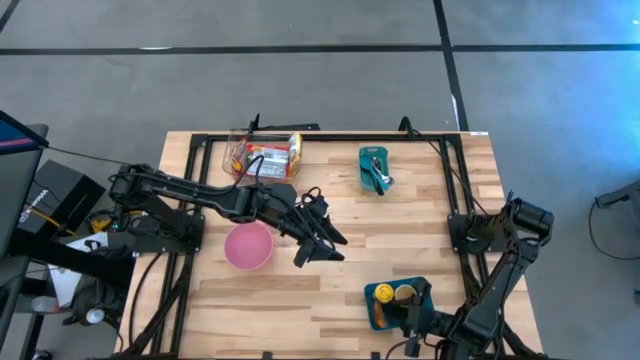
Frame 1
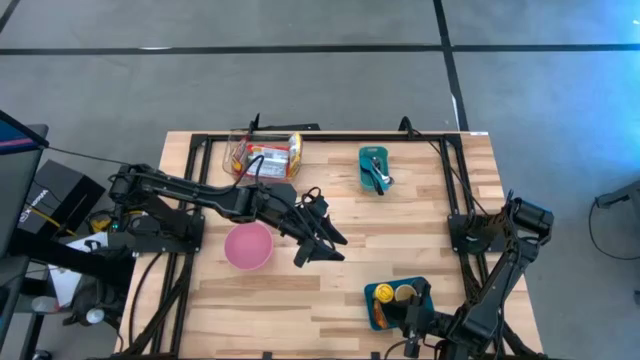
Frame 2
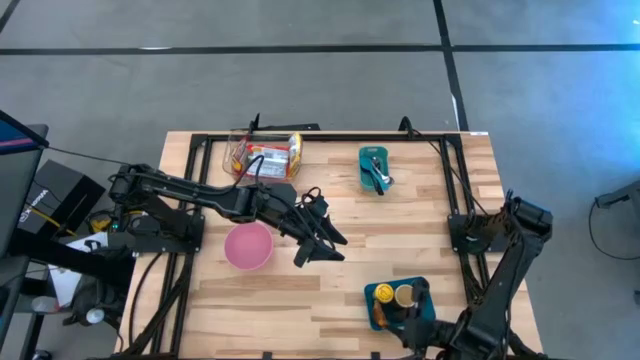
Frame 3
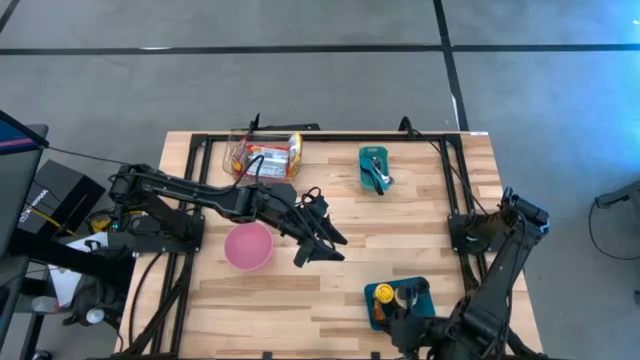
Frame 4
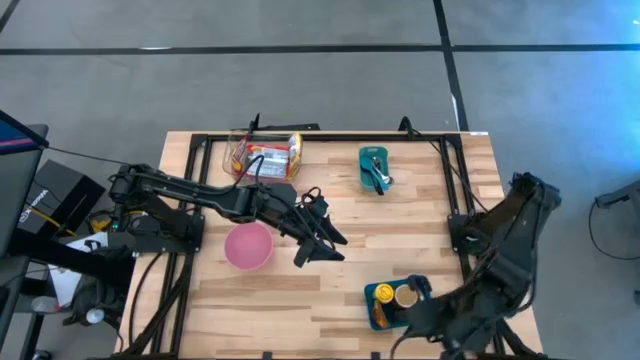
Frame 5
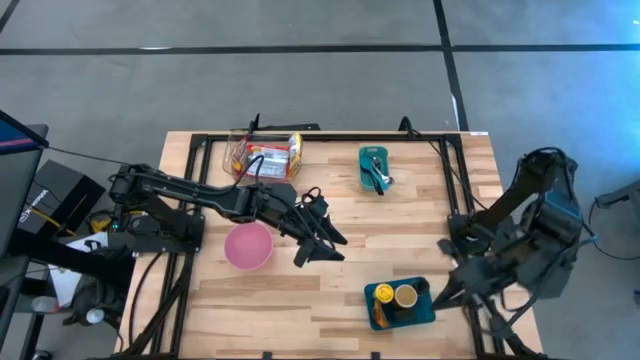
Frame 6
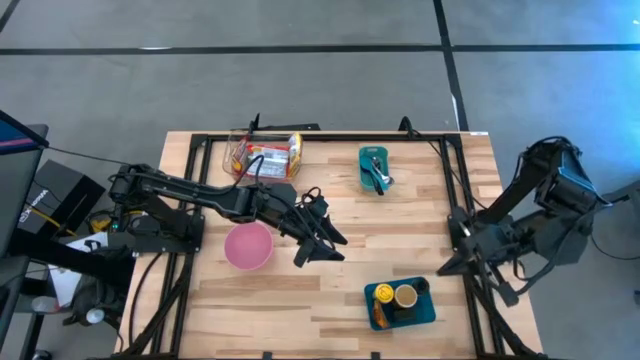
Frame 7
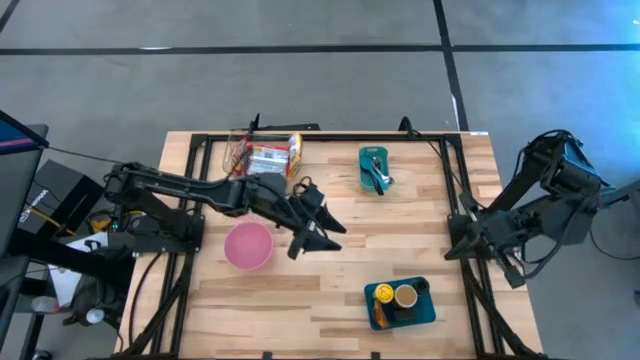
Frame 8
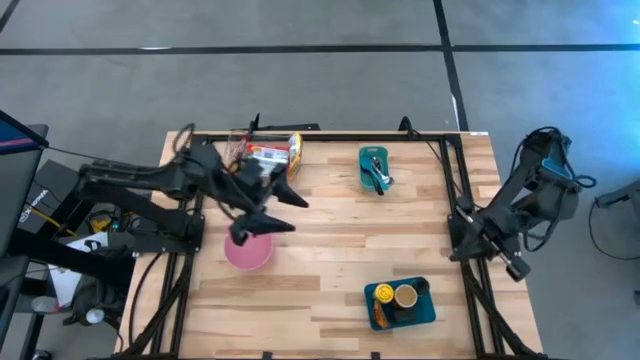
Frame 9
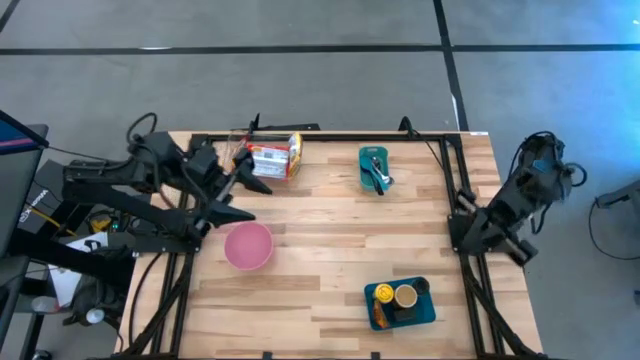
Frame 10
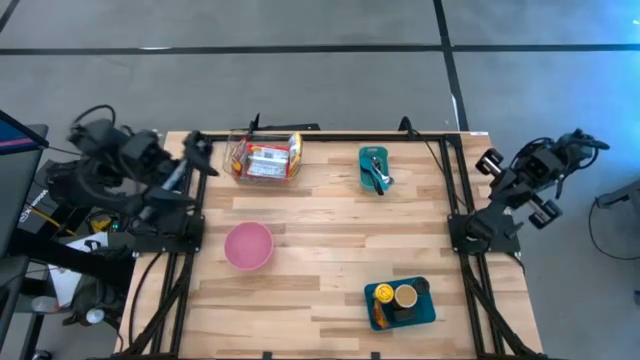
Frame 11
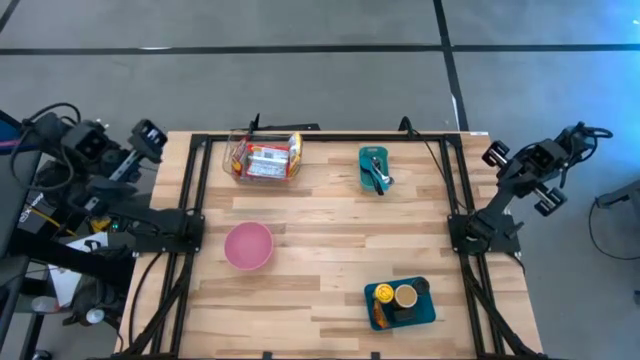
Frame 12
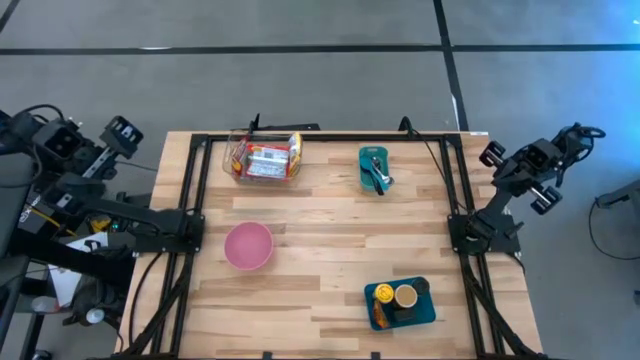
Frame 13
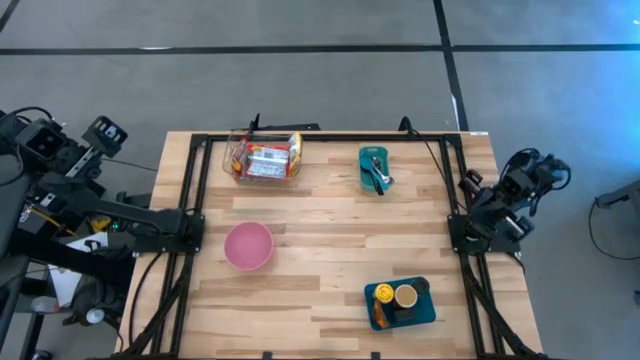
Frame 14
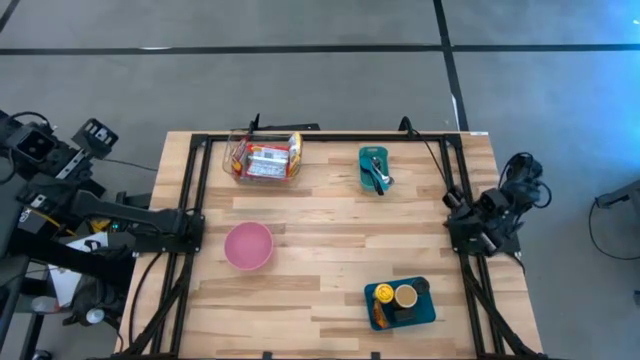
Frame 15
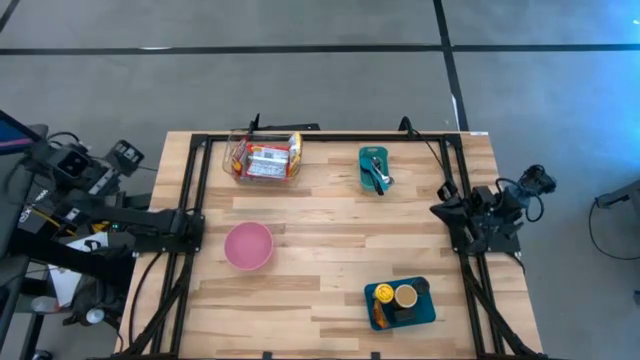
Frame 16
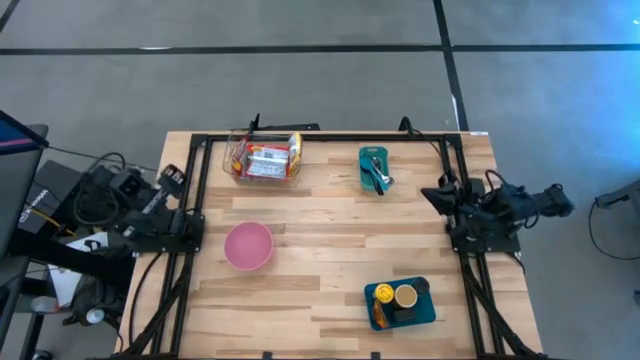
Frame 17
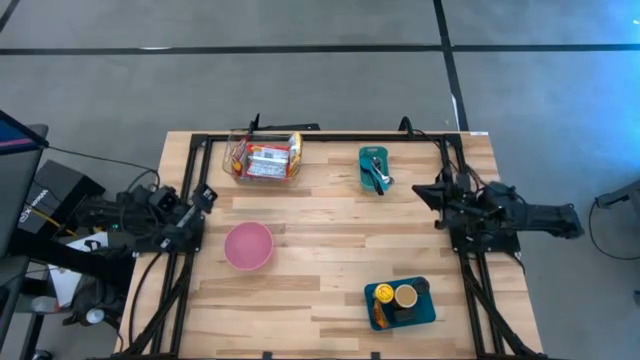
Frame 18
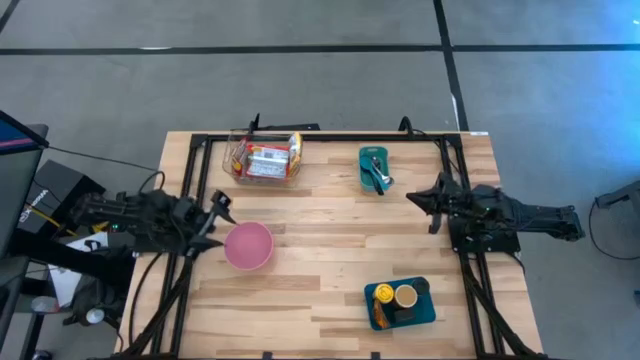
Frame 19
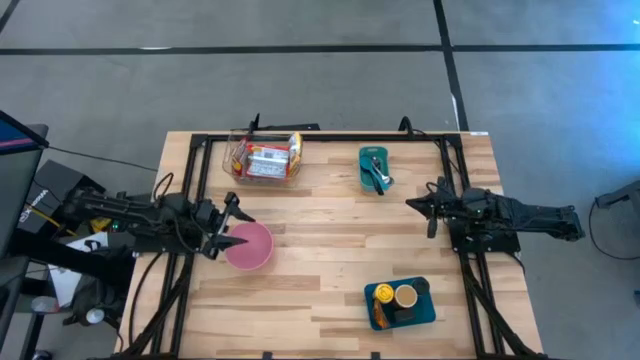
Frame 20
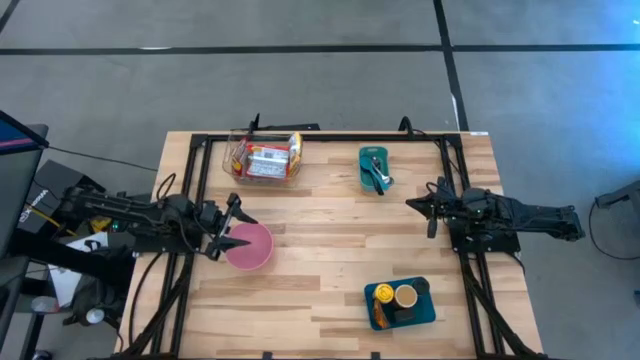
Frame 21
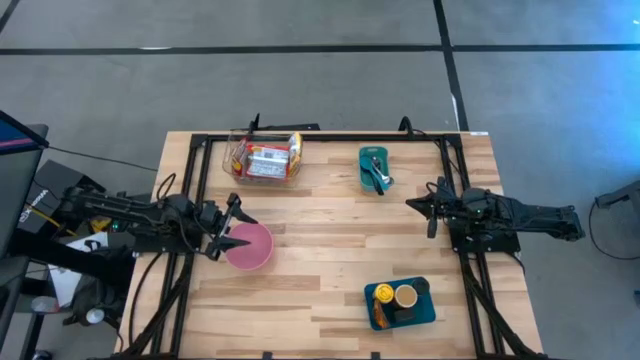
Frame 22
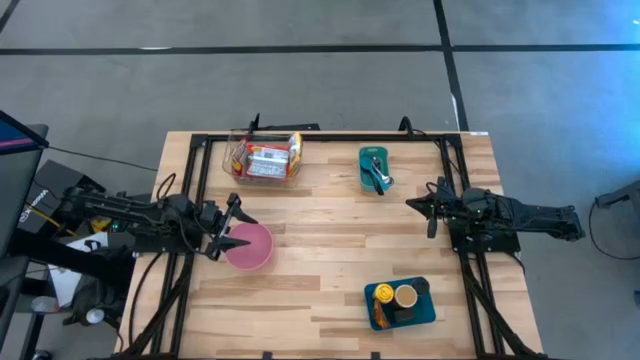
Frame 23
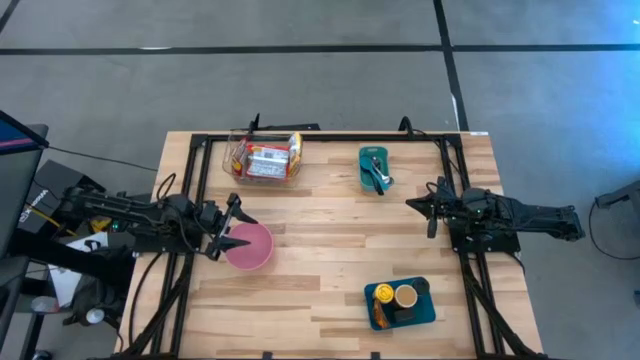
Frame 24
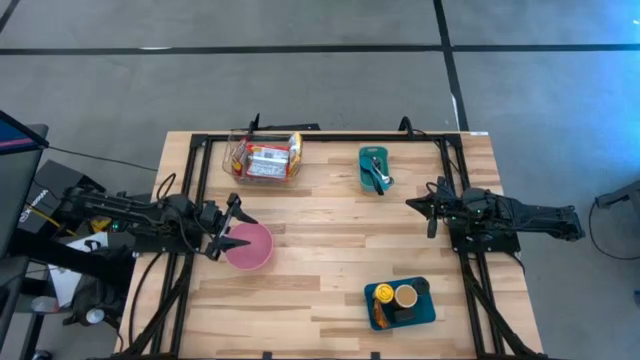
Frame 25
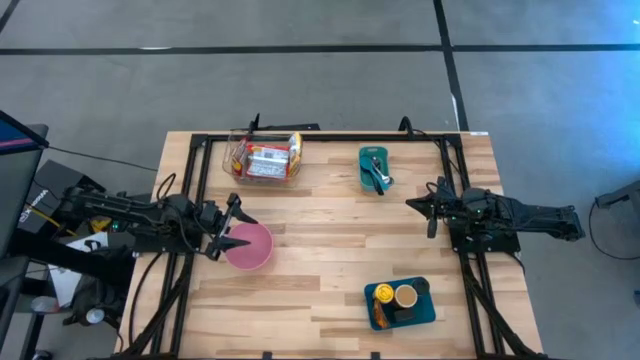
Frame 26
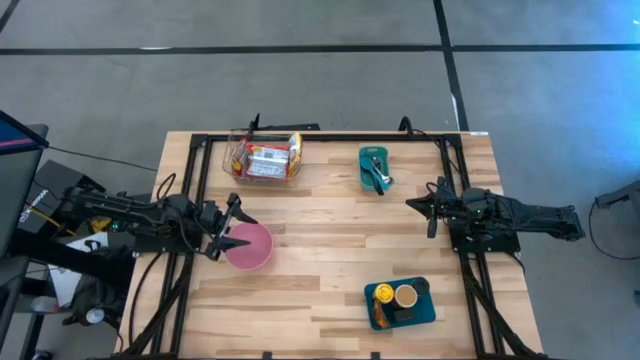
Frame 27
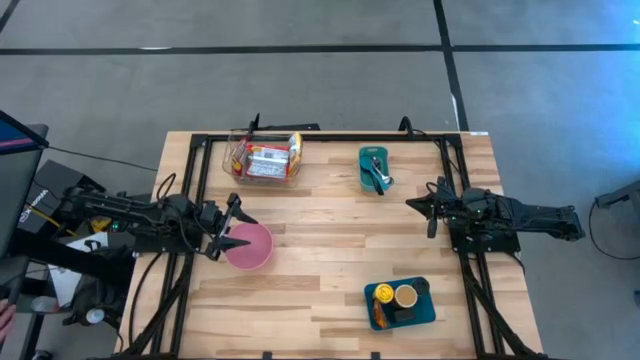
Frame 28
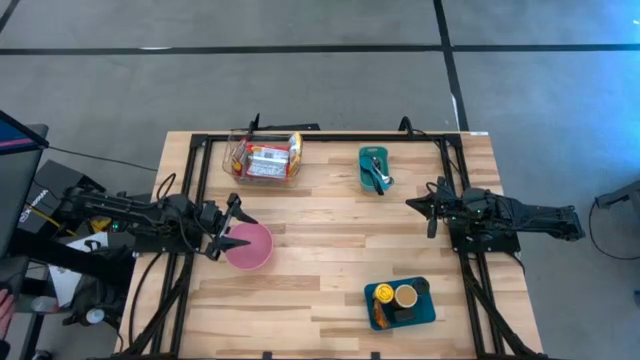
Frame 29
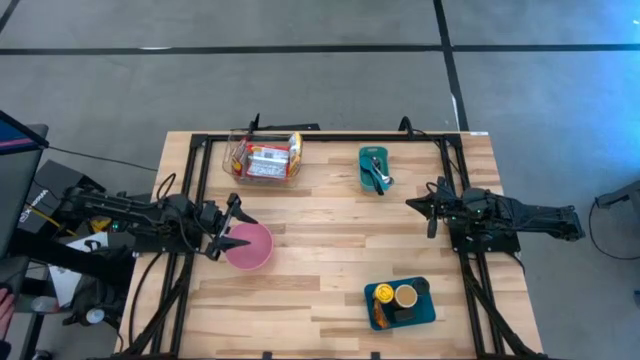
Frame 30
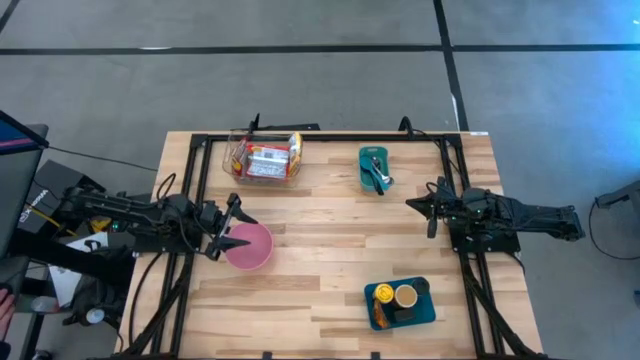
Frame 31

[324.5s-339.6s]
Task: Pick & Place Food Item
Return to Home Position

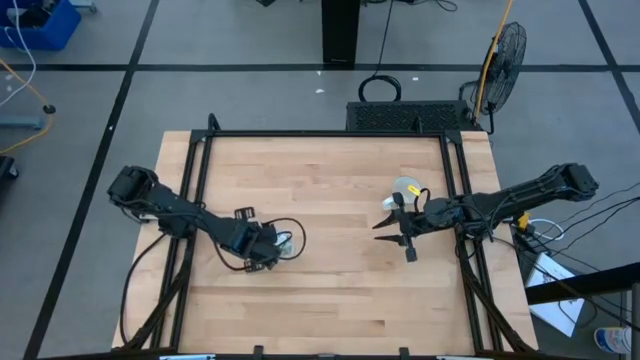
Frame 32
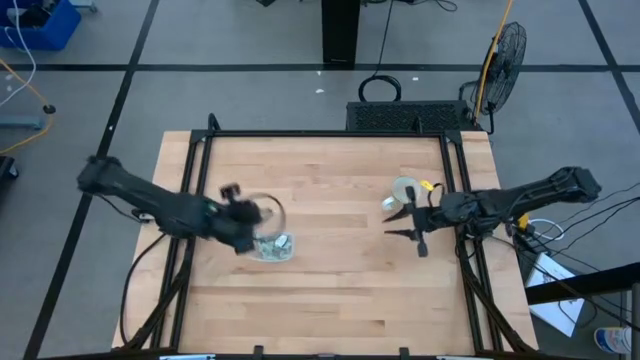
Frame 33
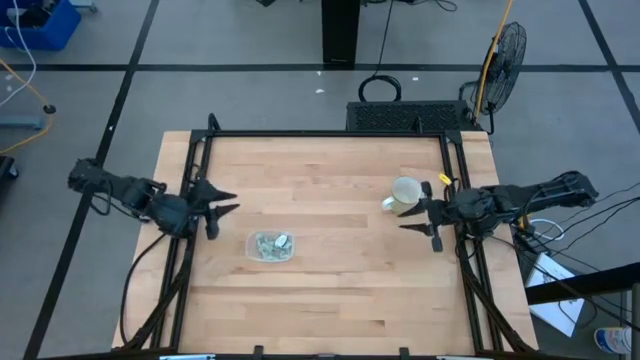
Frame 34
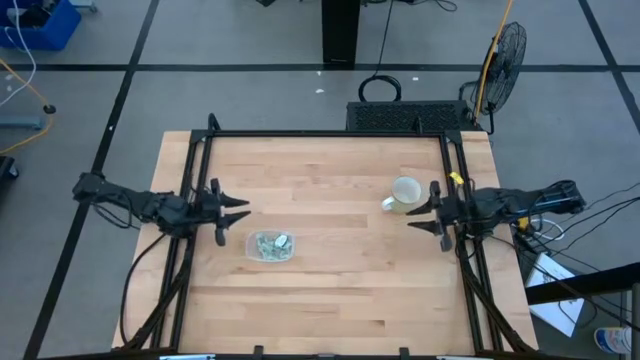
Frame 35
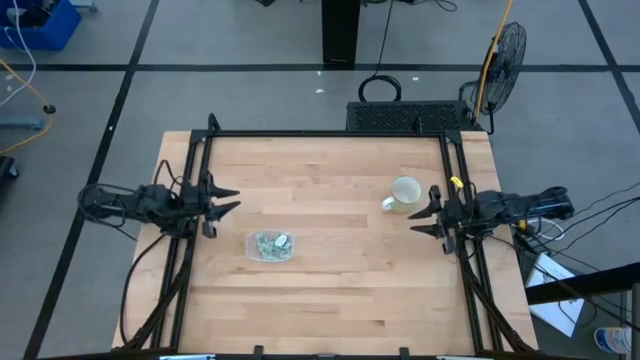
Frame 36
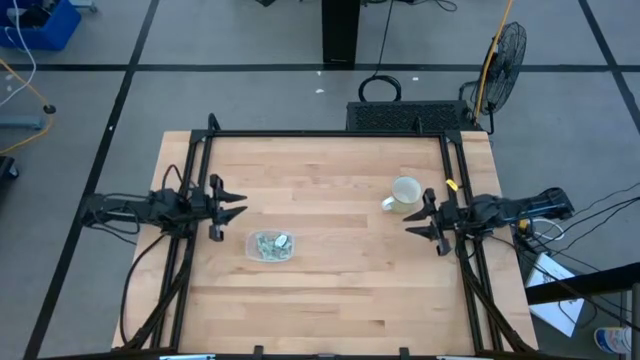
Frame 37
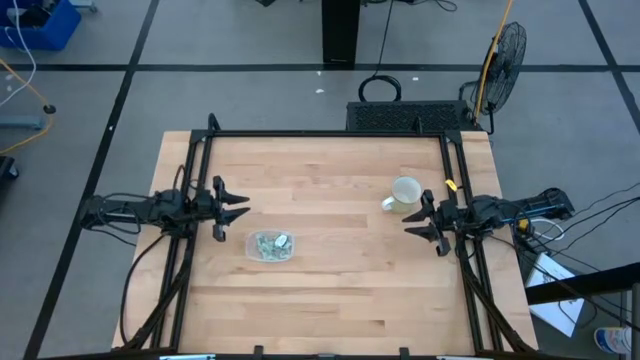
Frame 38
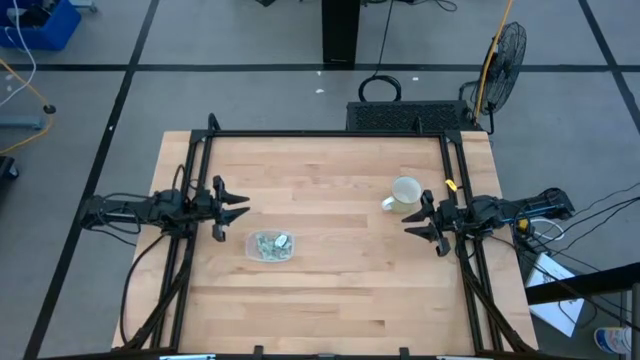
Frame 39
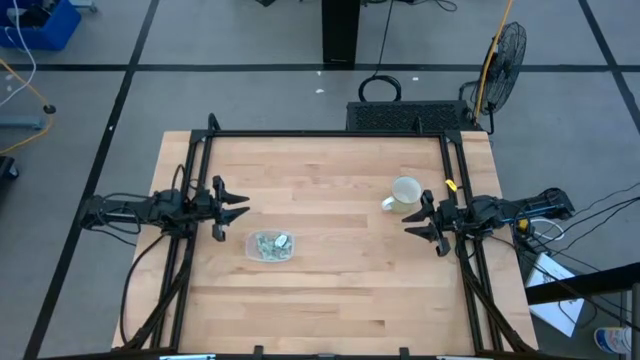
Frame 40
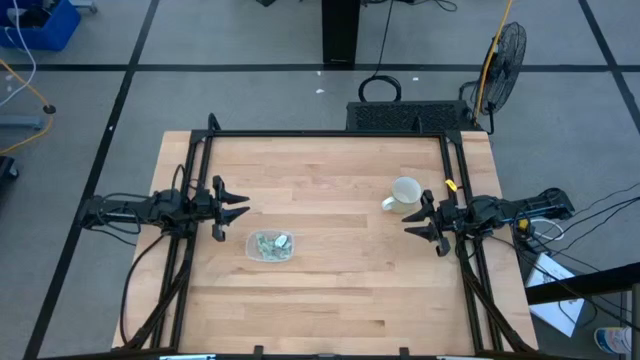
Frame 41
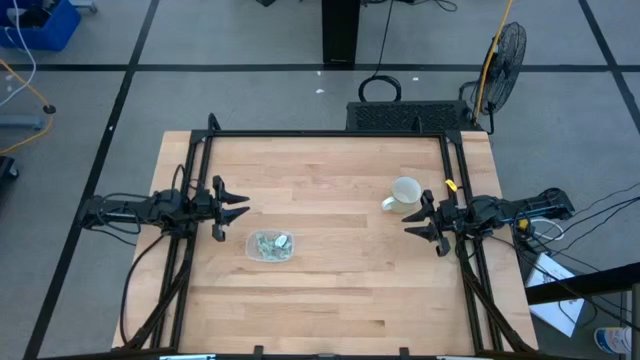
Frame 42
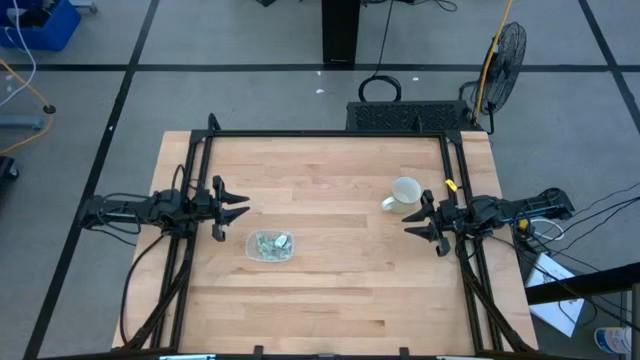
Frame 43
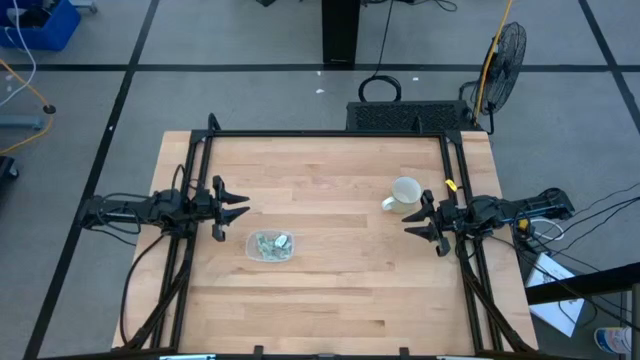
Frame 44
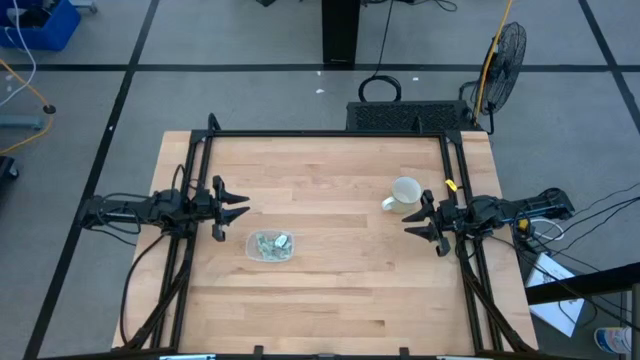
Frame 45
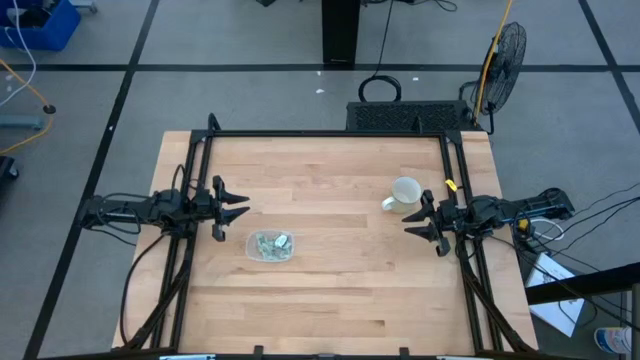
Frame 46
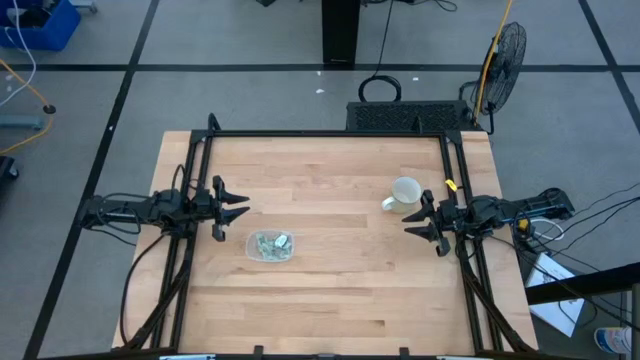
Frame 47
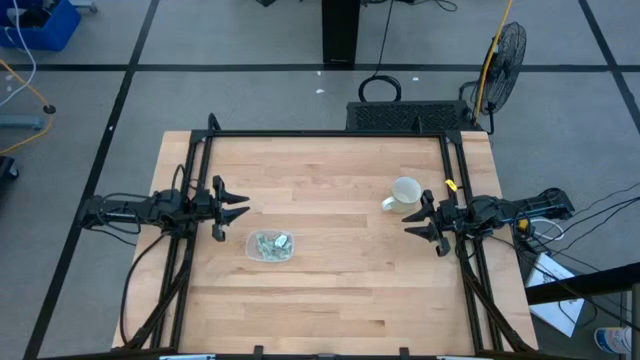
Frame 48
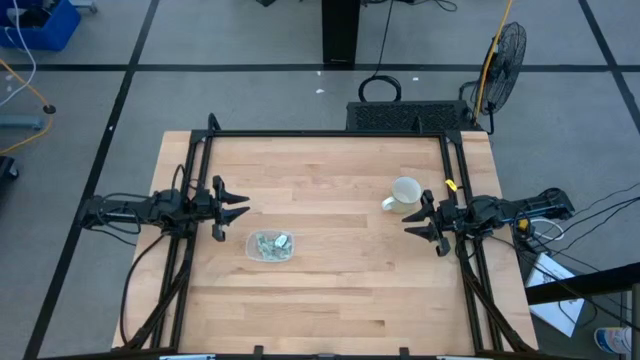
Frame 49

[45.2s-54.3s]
Task: Pick and place Stevia / Truvia into bins
Return to Home Position
